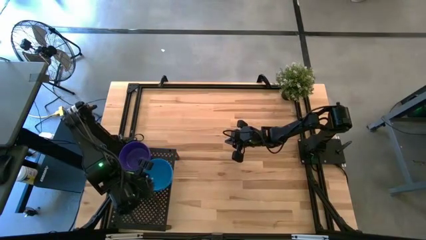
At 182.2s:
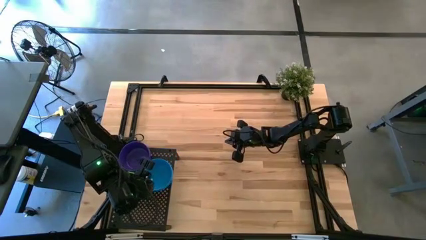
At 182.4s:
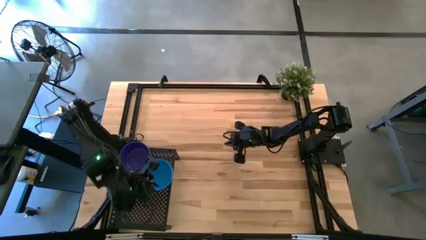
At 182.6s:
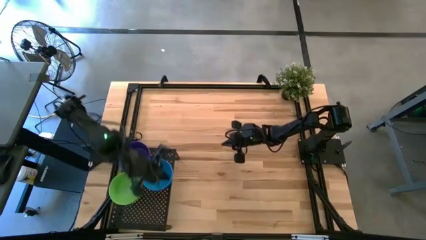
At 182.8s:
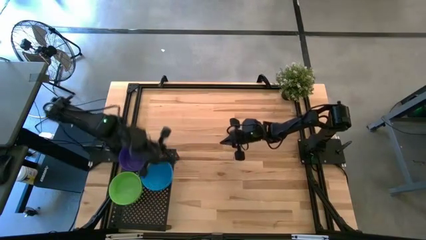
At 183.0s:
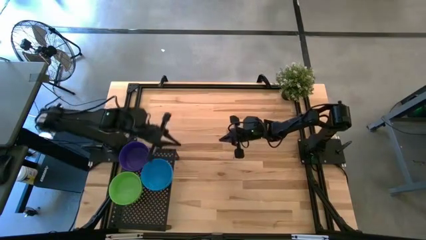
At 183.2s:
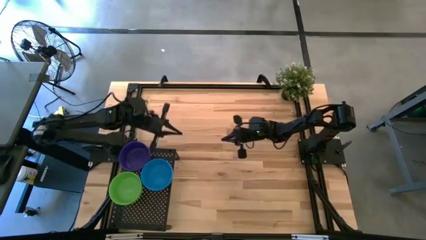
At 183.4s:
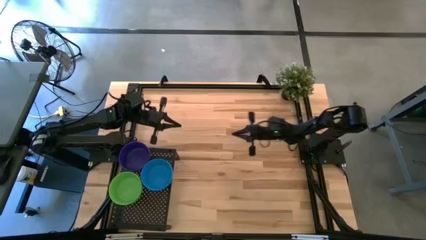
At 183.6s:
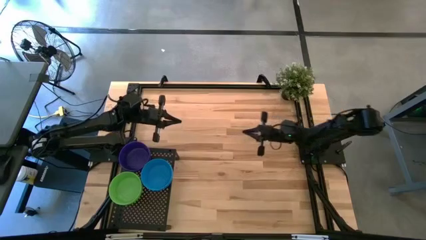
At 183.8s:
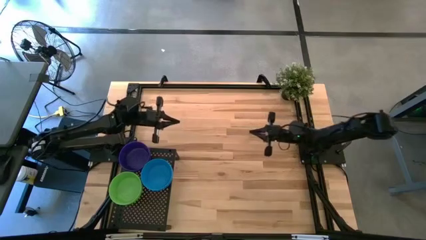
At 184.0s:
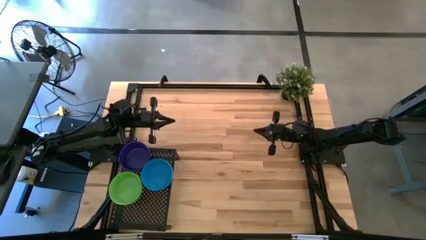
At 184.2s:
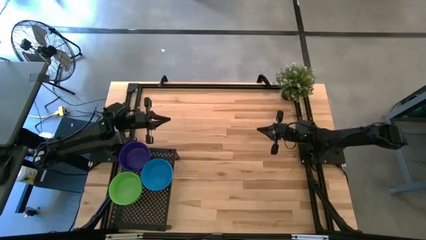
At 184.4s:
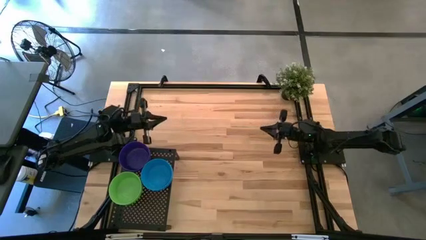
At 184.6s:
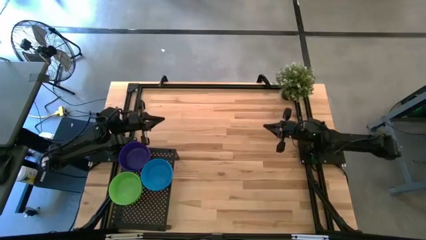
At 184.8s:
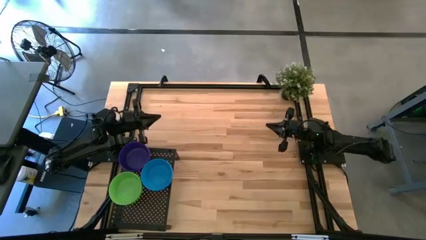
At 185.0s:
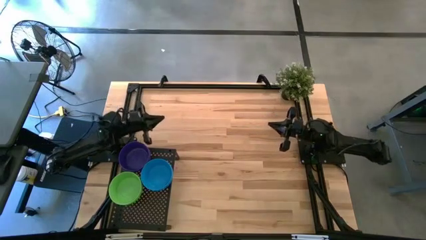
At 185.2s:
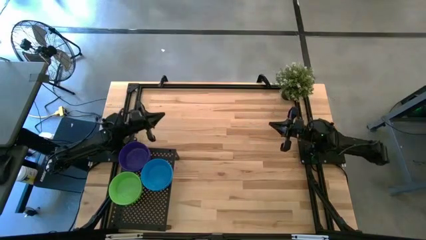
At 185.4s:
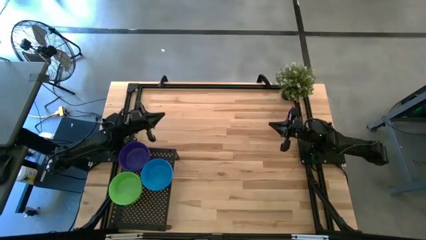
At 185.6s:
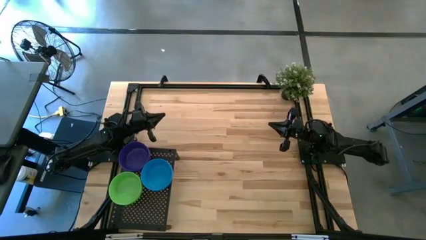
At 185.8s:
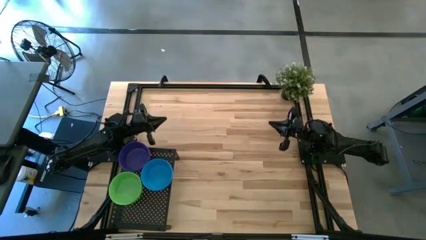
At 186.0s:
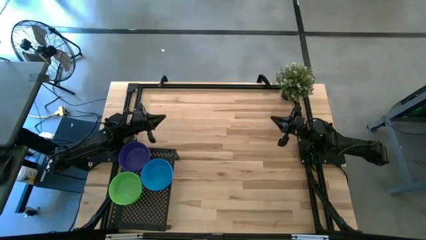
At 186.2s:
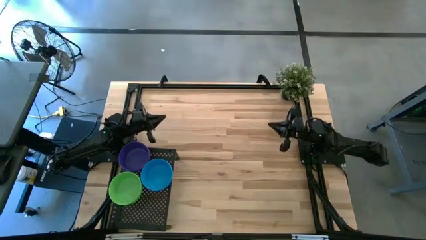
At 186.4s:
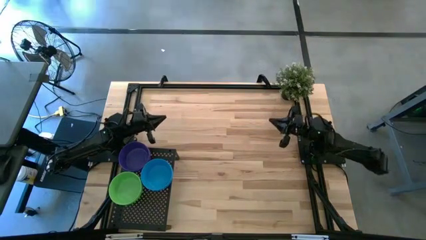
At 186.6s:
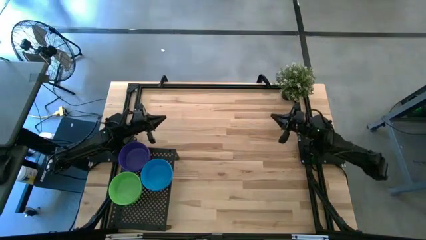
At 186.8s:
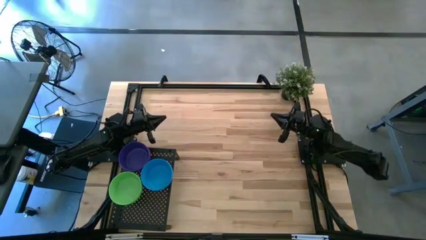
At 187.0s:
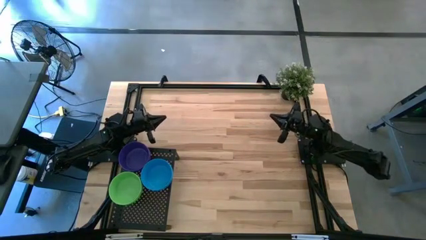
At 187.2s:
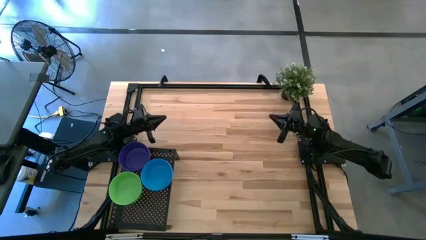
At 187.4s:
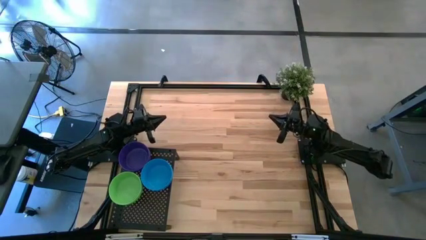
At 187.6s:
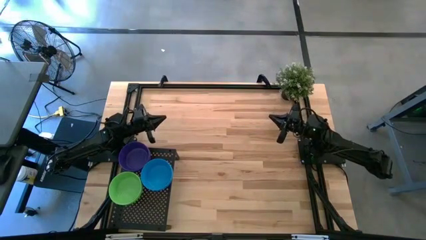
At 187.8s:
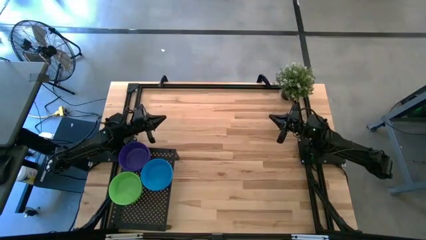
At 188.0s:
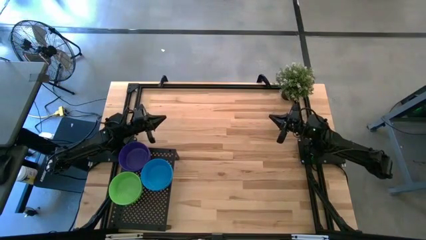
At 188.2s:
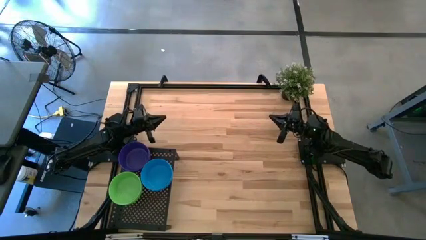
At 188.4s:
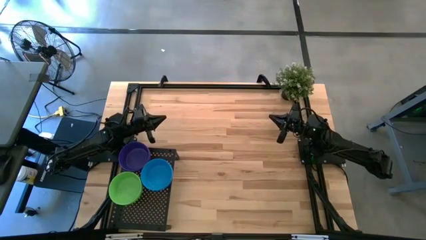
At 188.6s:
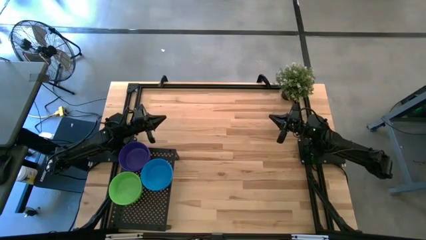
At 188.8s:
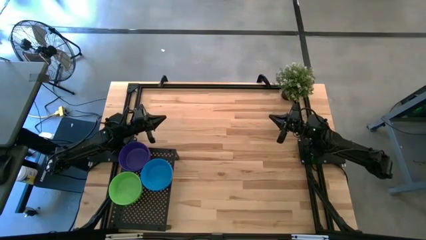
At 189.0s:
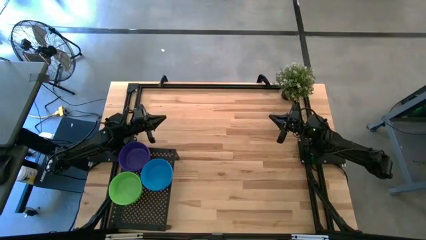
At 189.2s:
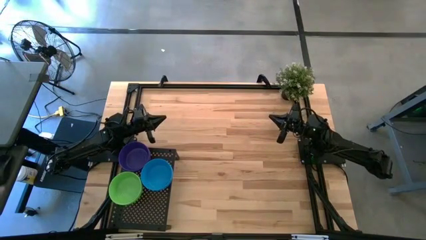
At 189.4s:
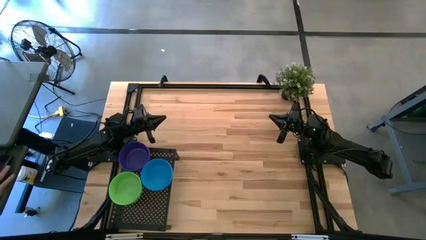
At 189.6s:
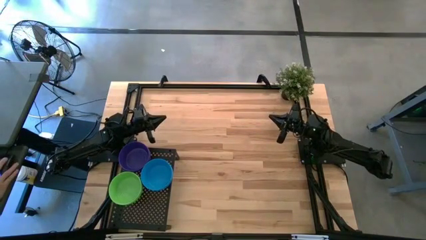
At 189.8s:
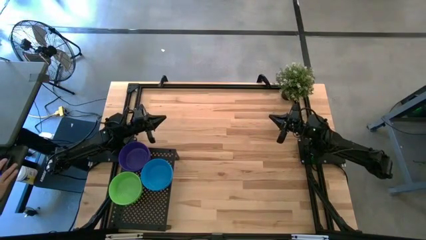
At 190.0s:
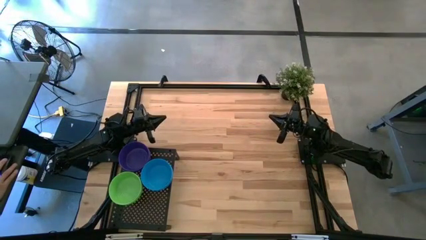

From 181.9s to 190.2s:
Task: Pick & Place Mini bowls
Return to Home Position

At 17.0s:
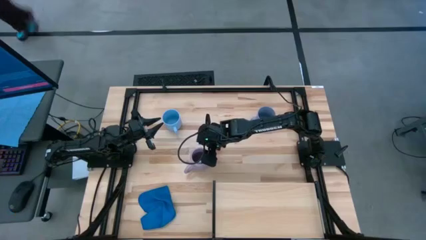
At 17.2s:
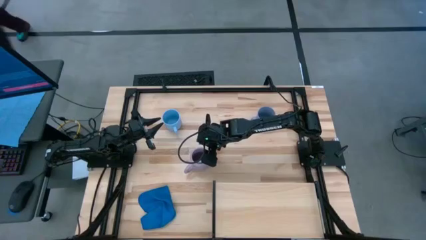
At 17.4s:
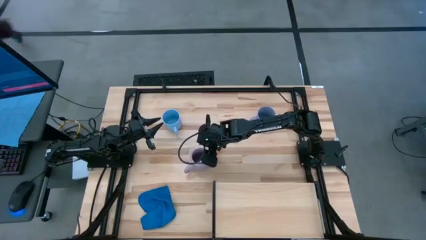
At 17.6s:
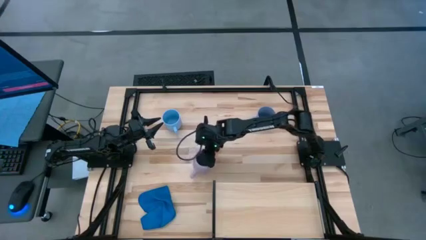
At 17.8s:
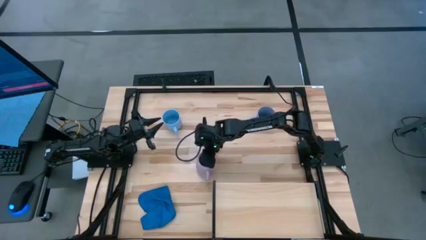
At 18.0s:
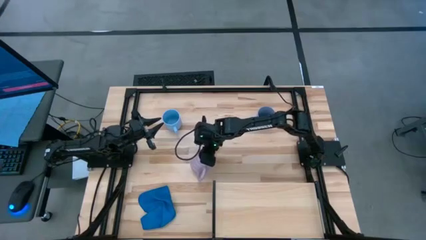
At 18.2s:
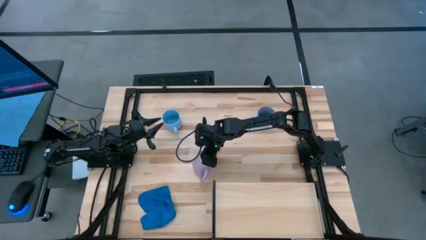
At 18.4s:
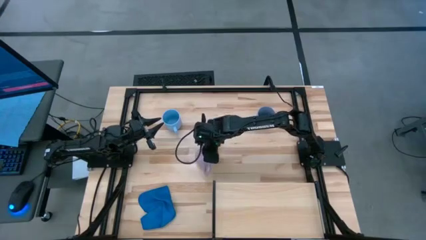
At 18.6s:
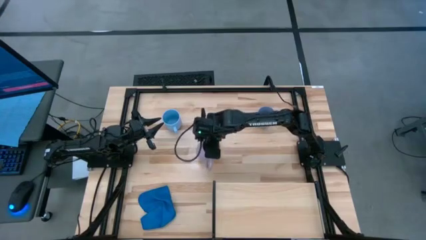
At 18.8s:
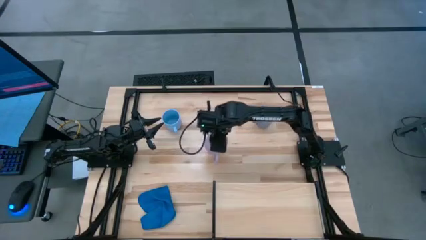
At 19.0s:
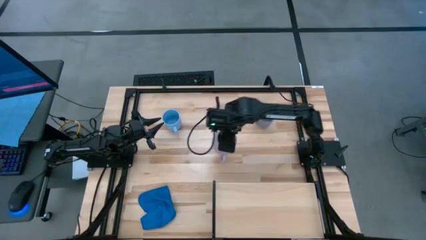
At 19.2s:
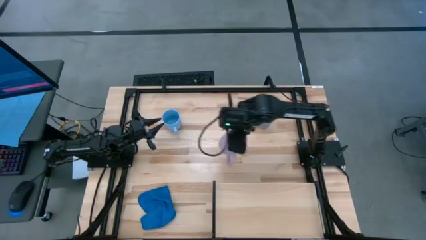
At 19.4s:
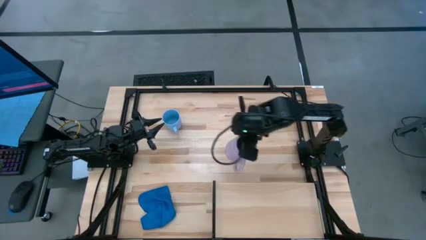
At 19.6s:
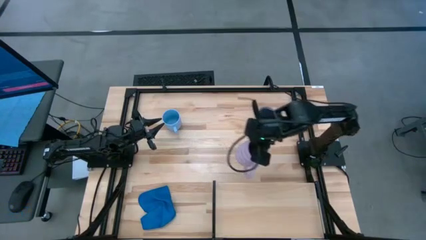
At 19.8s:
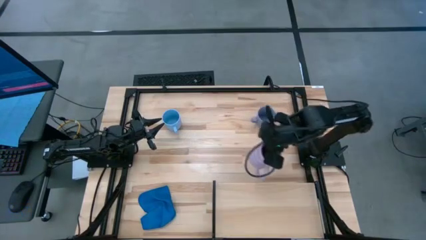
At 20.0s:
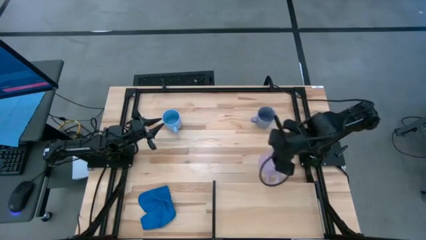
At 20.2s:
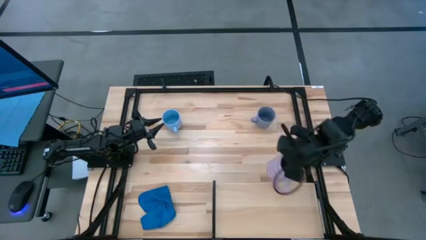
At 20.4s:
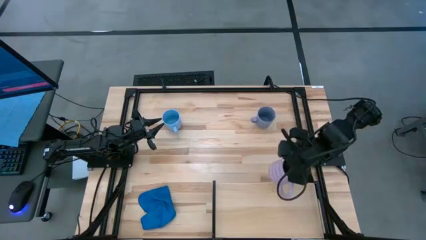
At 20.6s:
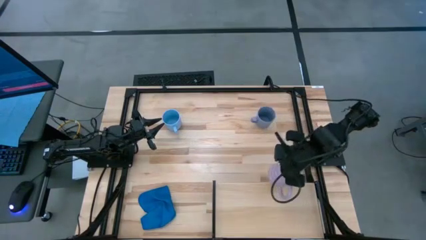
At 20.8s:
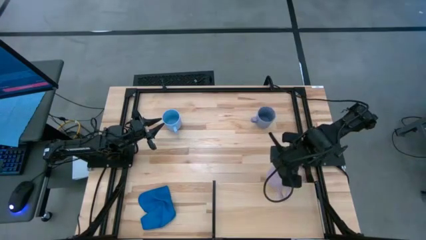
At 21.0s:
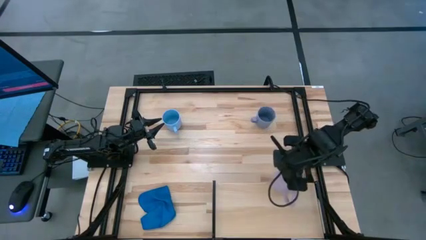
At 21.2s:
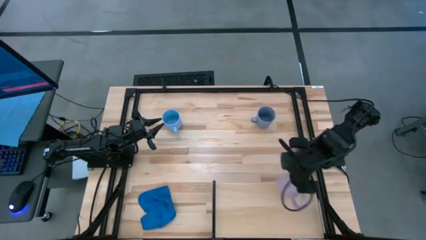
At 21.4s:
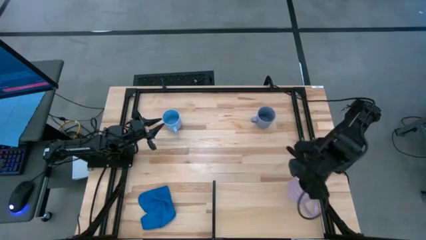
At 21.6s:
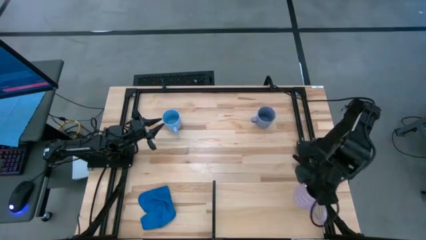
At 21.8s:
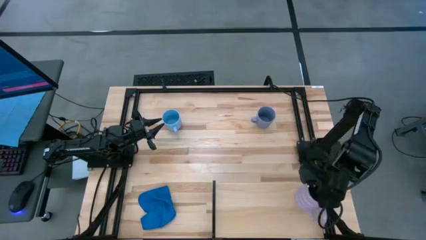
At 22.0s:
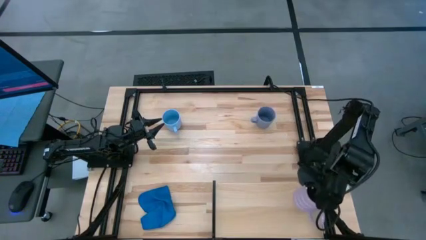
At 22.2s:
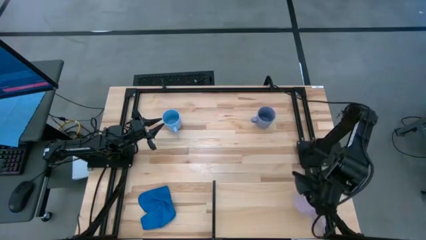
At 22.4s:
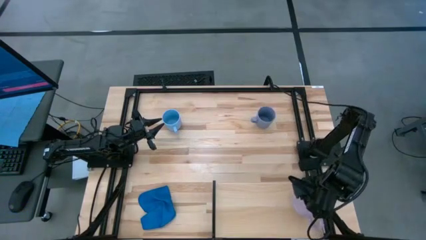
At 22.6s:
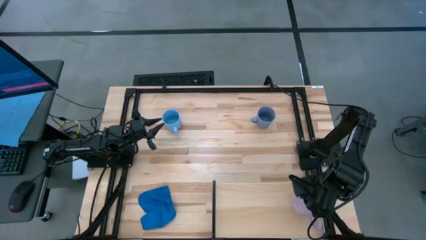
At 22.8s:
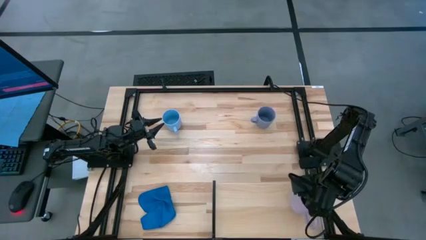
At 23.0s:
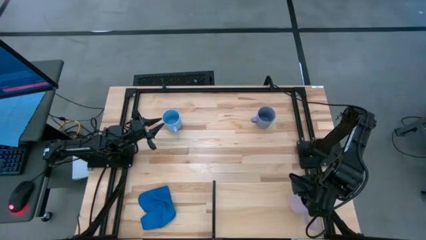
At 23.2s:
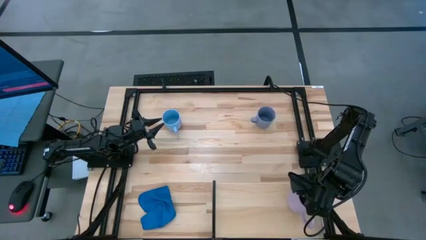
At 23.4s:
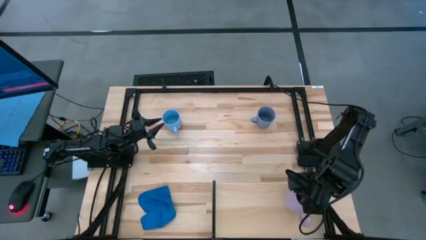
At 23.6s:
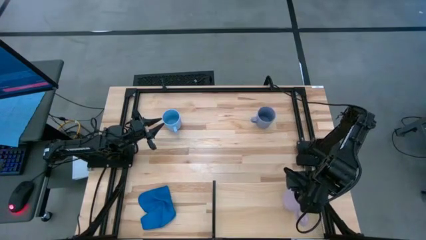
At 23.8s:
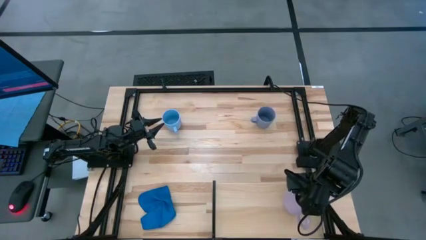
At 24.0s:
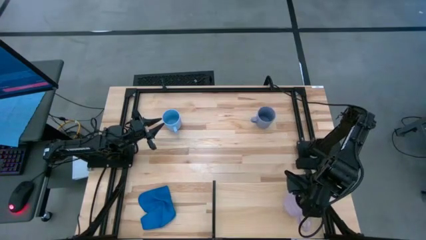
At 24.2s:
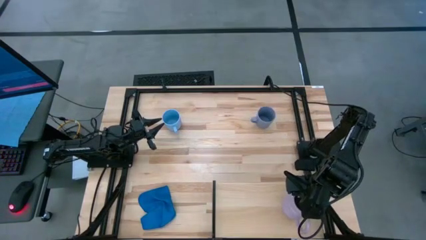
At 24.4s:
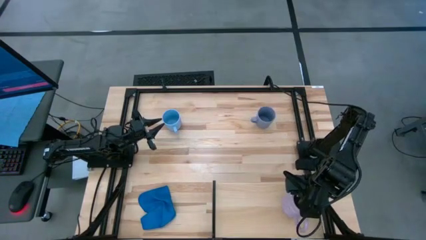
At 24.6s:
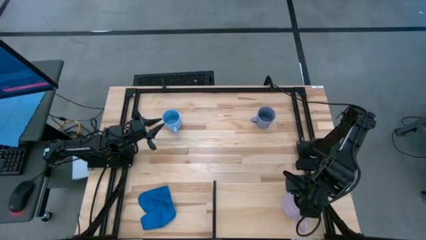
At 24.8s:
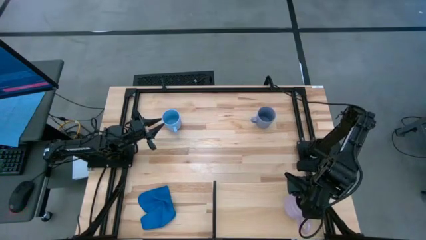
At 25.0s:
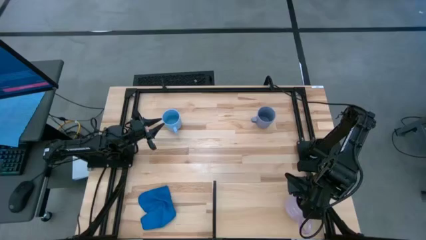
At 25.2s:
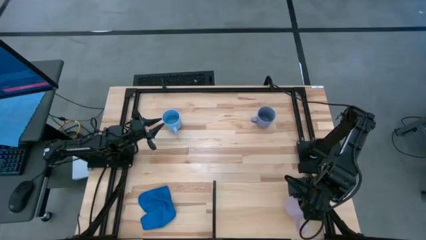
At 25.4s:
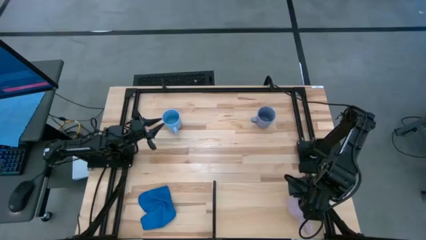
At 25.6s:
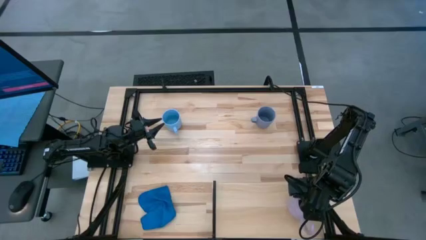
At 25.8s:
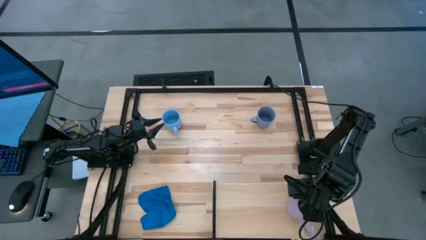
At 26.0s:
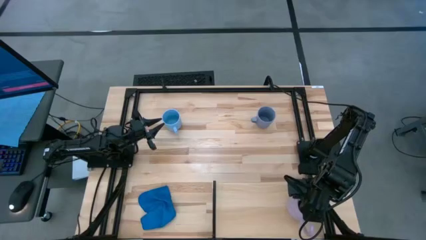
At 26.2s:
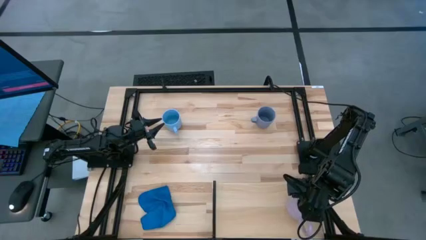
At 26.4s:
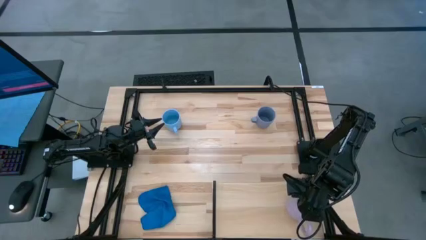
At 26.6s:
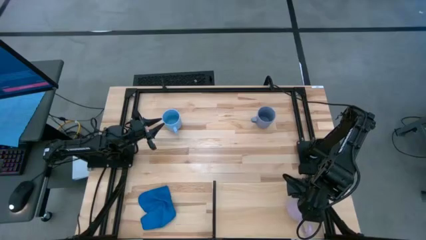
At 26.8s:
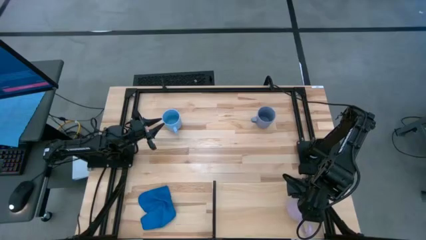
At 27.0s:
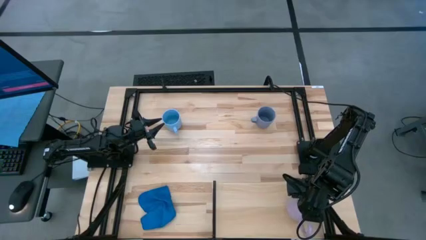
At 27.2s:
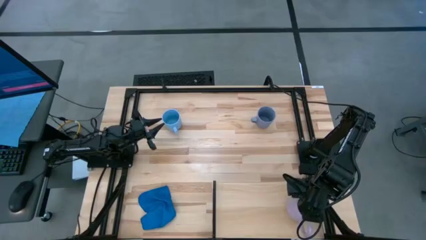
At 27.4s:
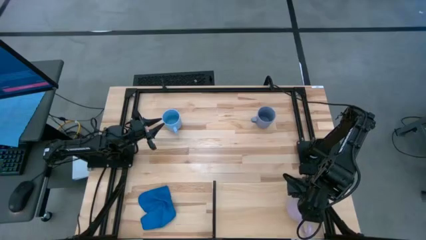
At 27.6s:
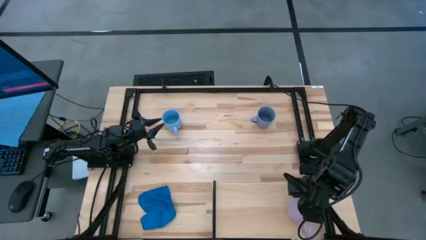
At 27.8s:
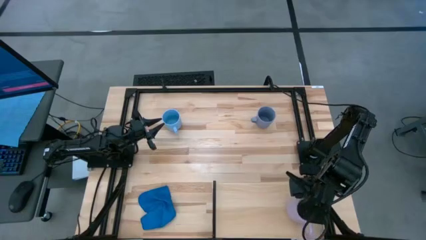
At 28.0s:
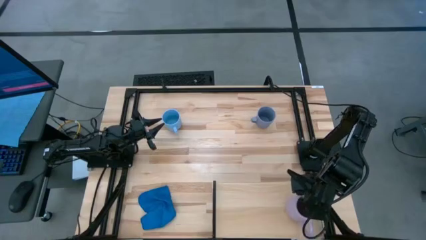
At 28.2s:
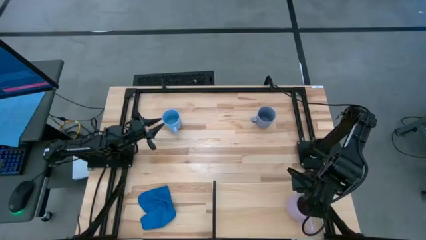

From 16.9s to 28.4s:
Task: Stack small to large cups/mugs on shelf
Put the purple mug on the shelf
